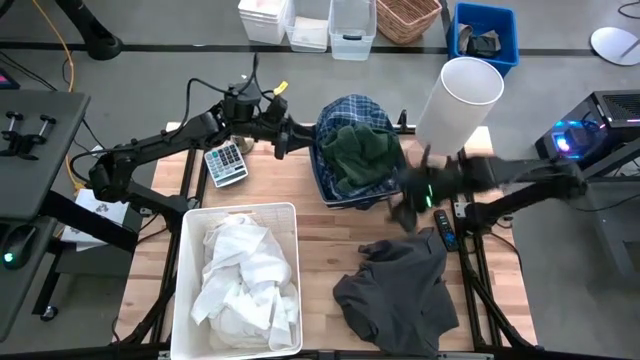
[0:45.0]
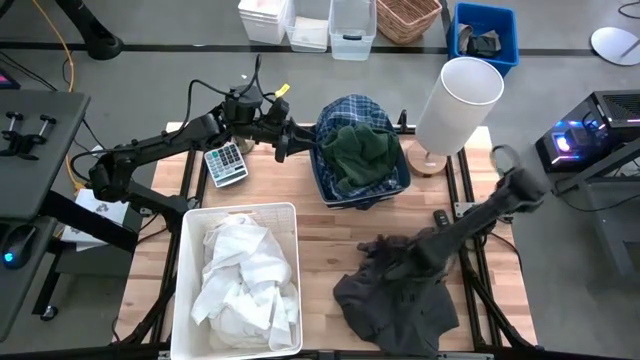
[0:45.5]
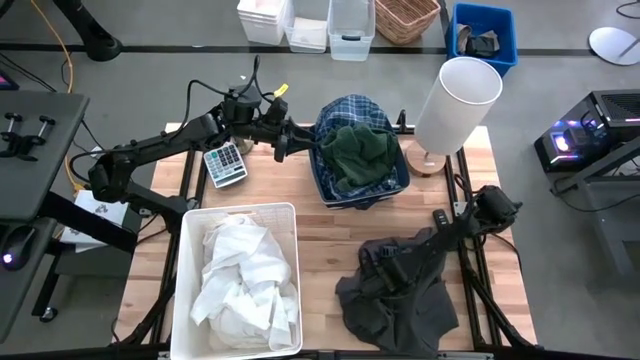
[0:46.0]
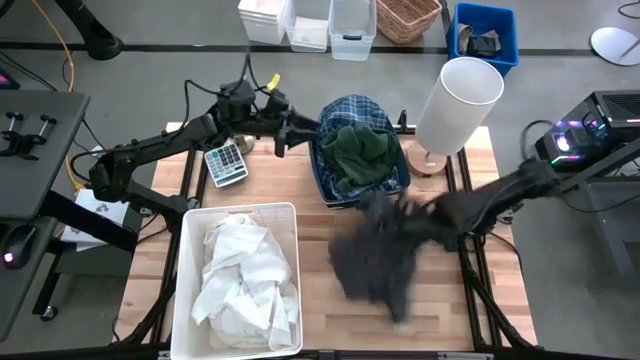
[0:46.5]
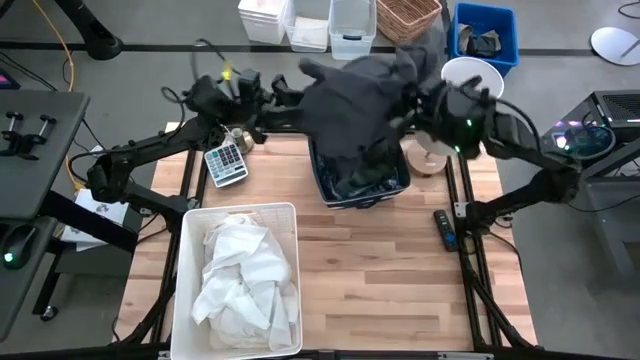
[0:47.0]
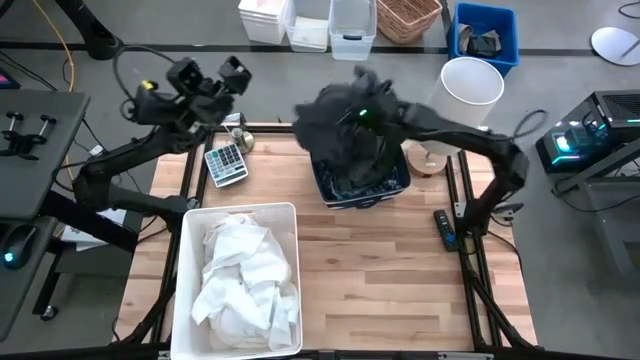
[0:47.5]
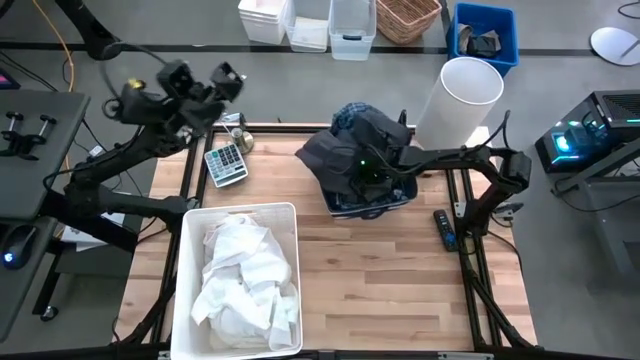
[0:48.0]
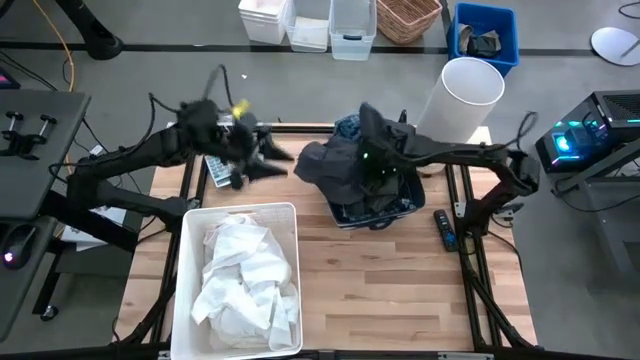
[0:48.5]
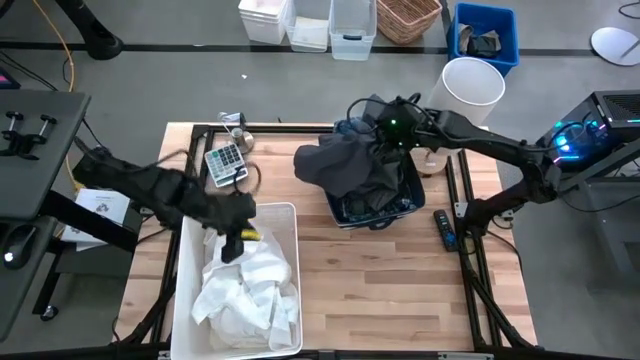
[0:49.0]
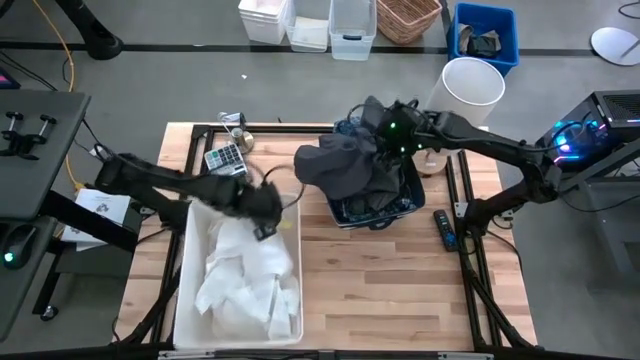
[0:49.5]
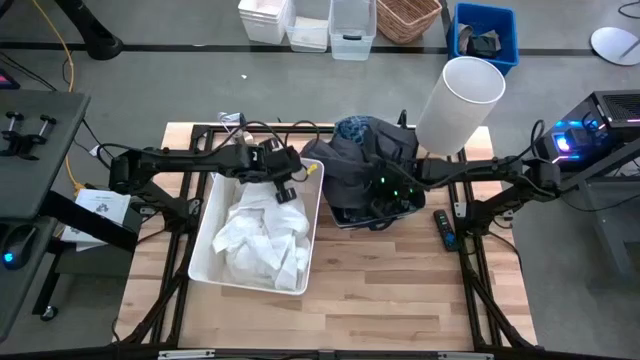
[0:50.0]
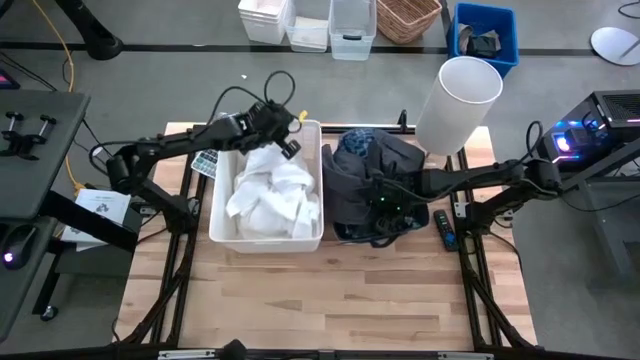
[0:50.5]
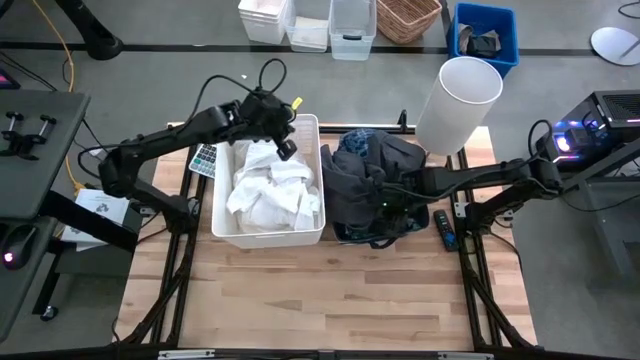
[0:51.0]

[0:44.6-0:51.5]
Task: Sort clothes
Put the black pants into the blue bin

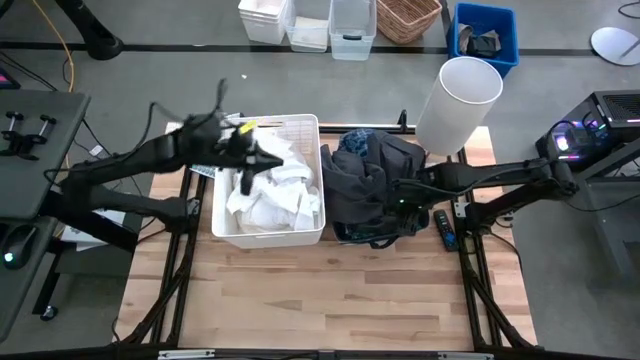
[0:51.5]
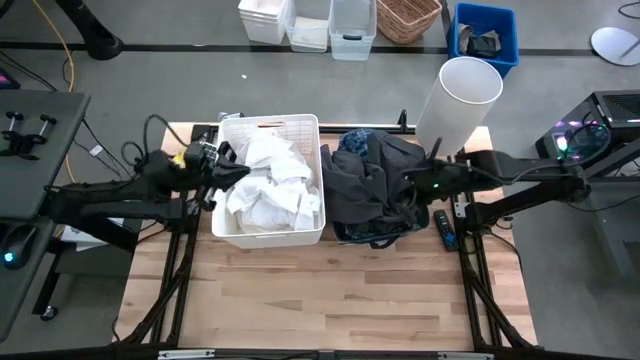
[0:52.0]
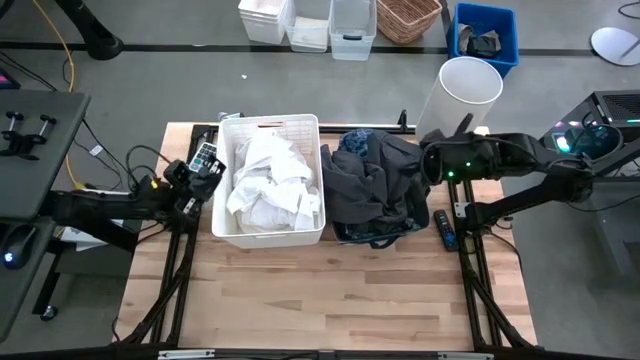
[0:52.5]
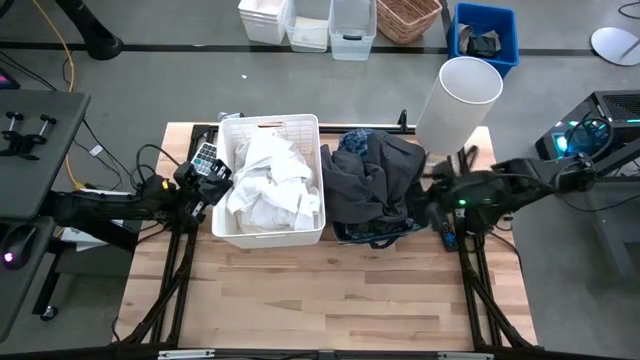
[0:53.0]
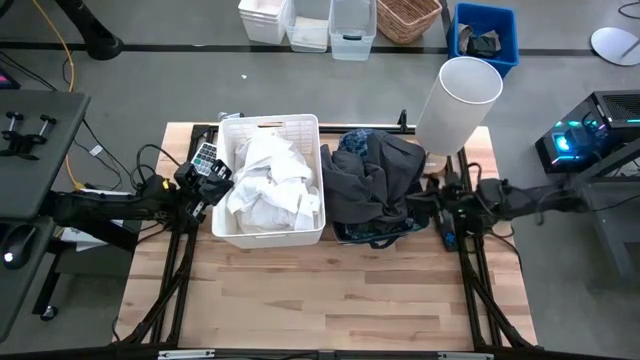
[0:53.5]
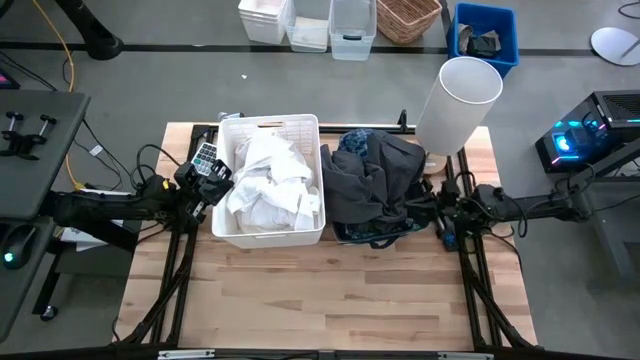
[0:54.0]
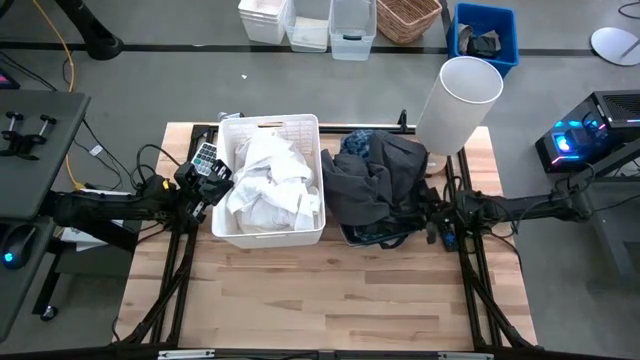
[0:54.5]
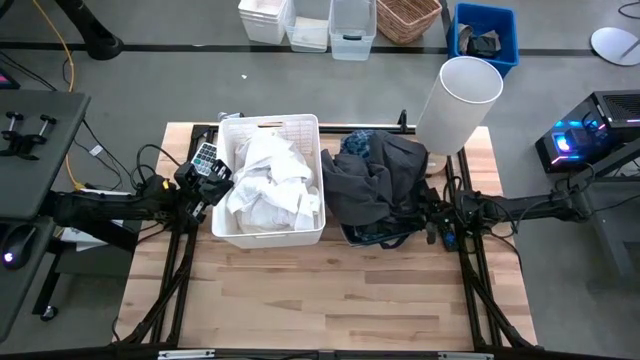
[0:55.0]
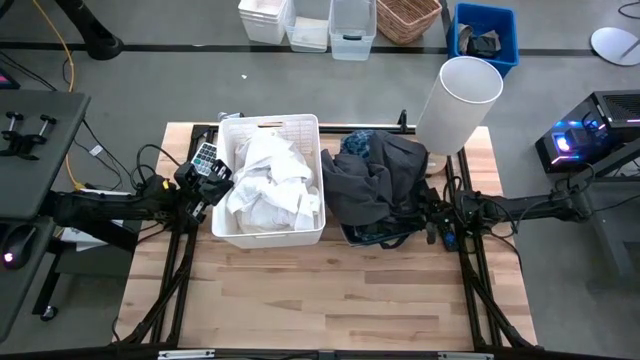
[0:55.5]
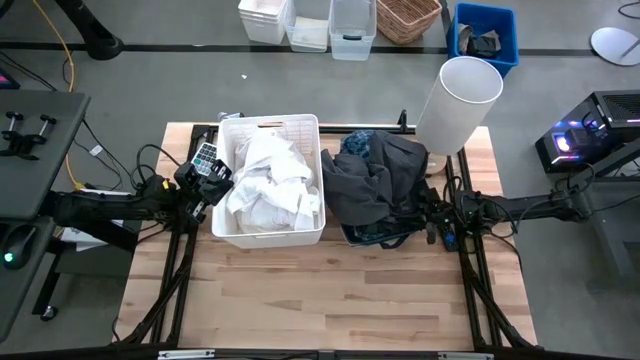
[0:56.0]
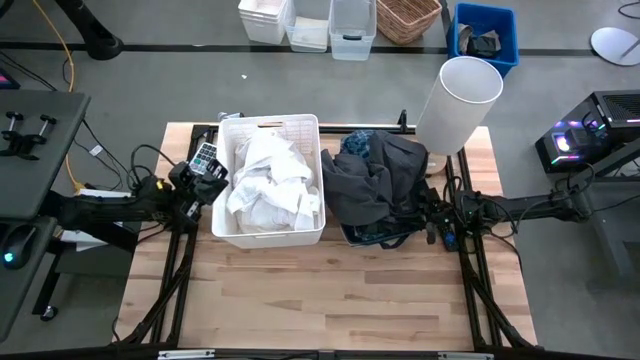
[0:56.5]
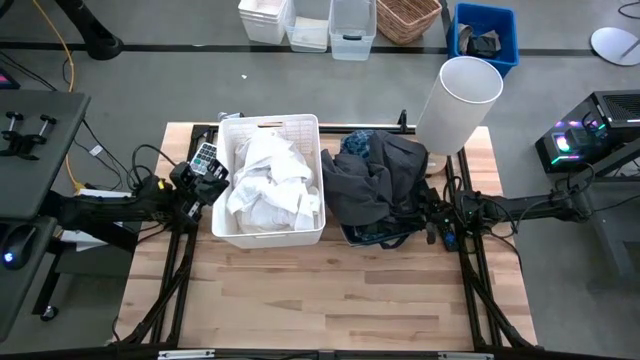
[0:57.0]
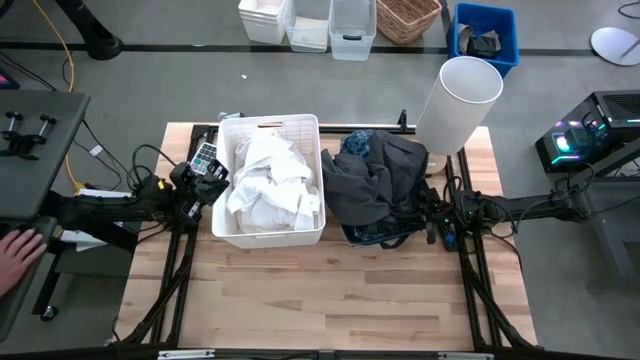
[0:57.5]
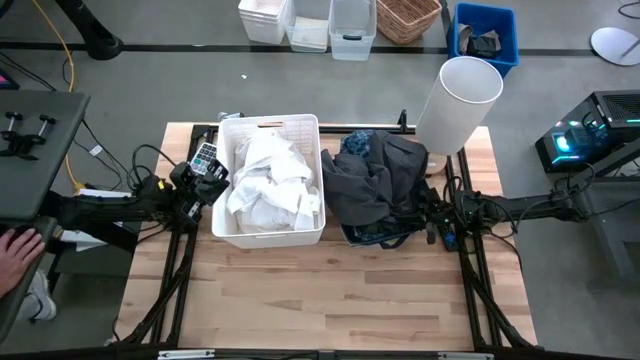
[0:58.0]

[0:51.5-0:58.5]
Return to home position

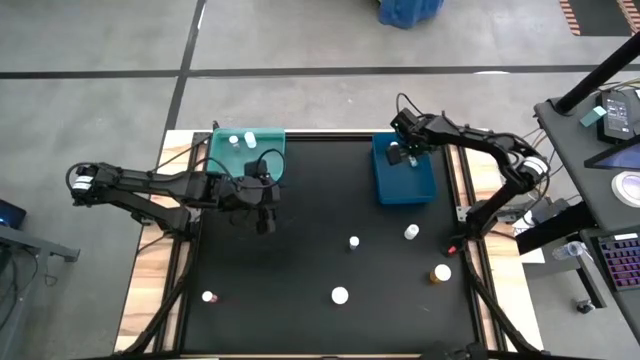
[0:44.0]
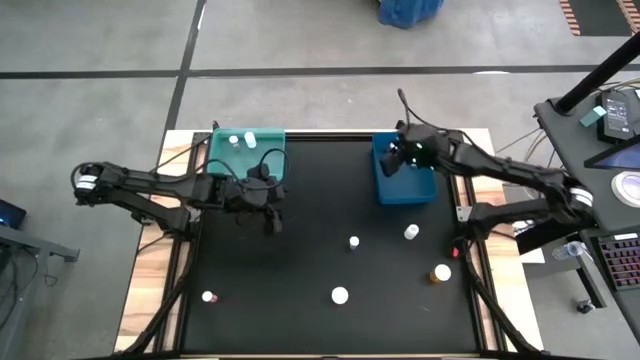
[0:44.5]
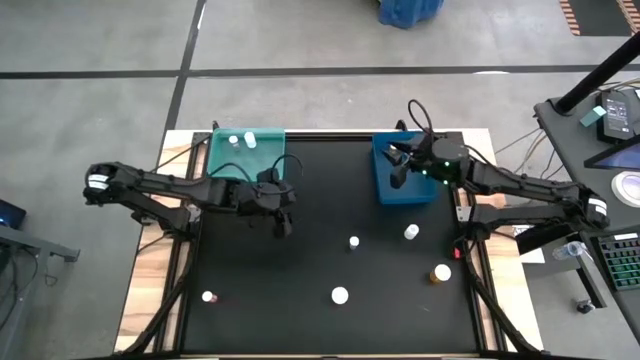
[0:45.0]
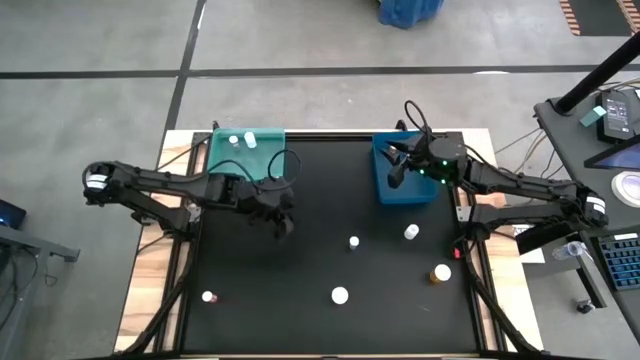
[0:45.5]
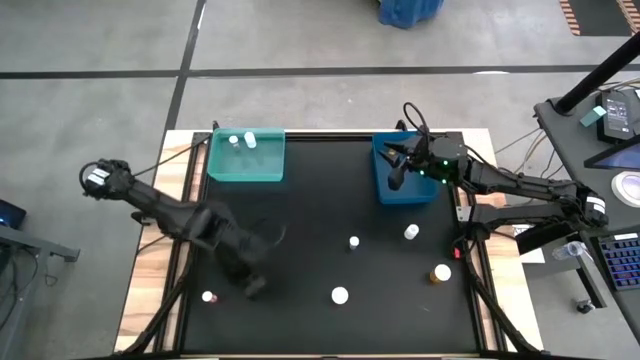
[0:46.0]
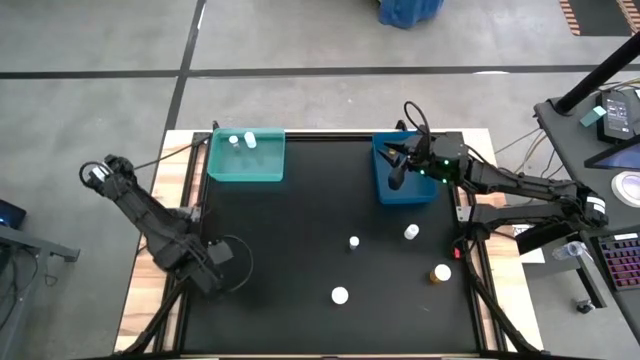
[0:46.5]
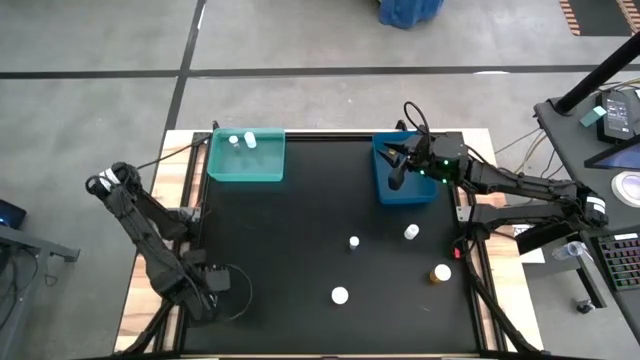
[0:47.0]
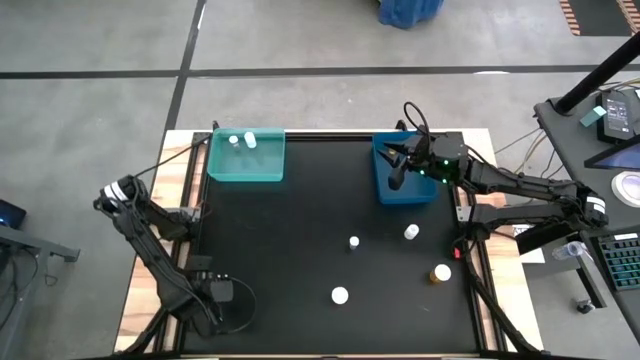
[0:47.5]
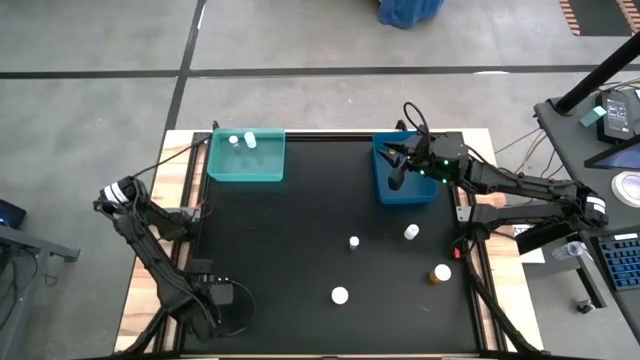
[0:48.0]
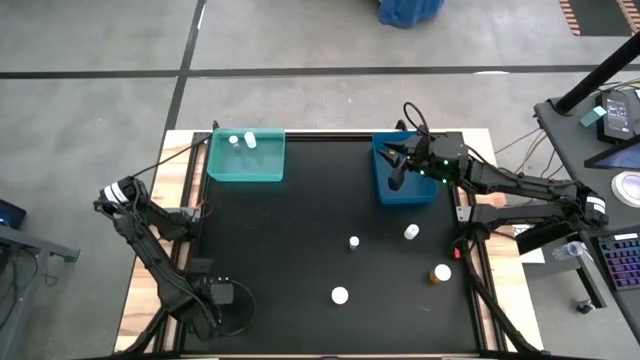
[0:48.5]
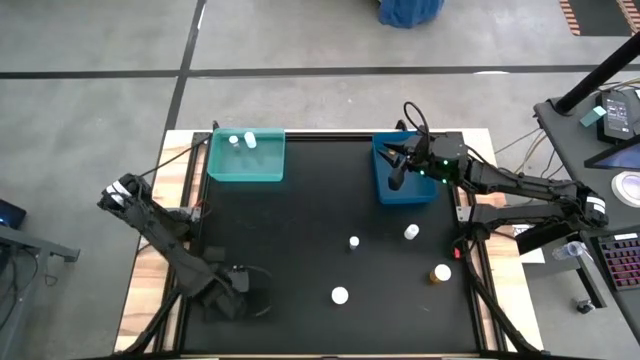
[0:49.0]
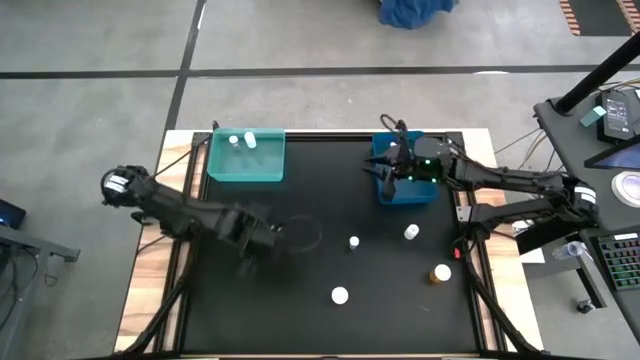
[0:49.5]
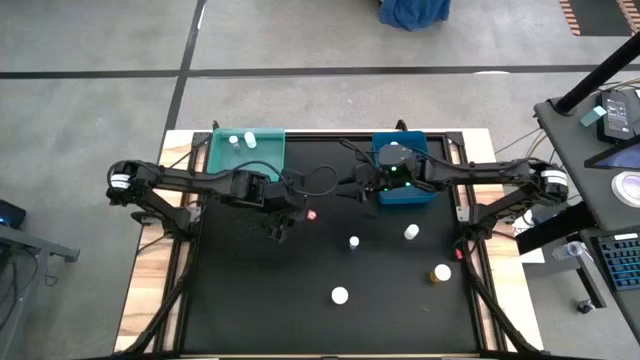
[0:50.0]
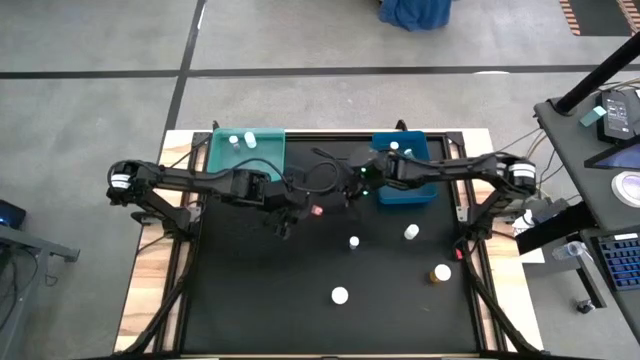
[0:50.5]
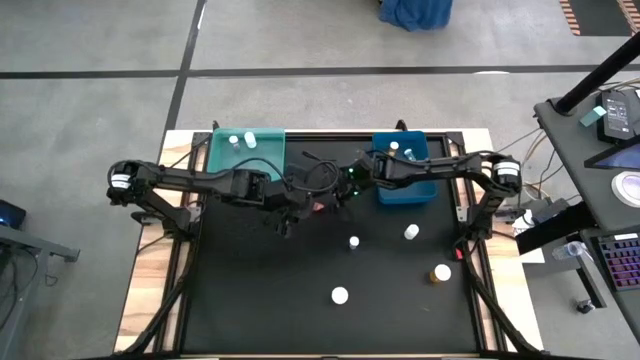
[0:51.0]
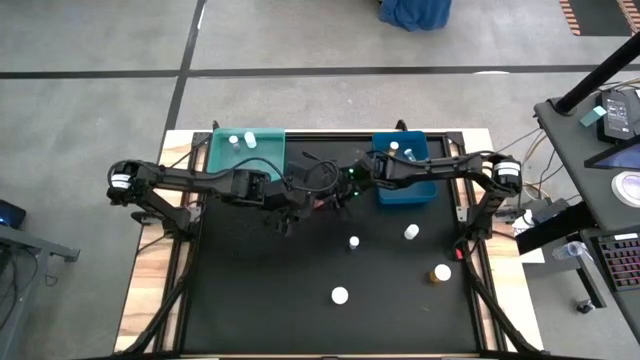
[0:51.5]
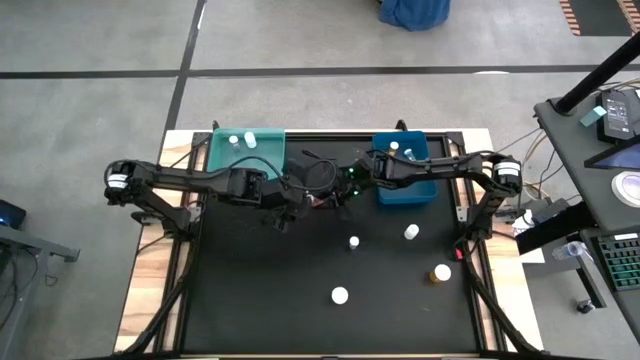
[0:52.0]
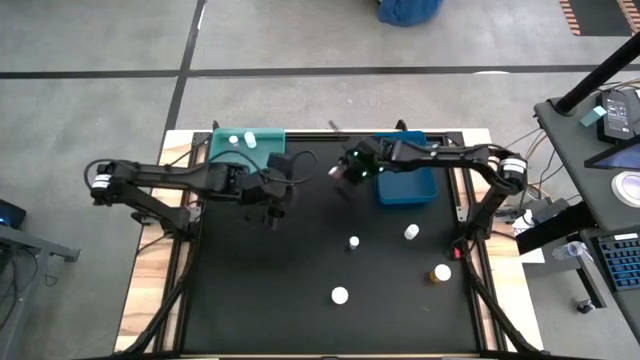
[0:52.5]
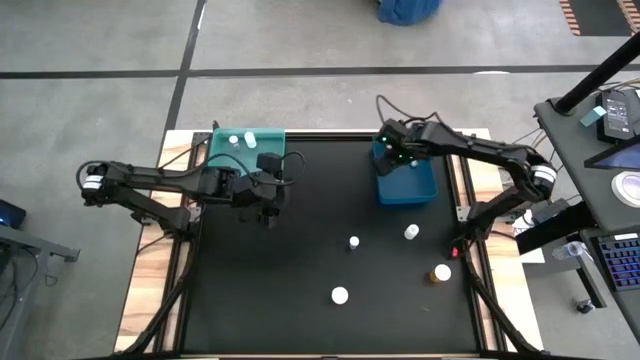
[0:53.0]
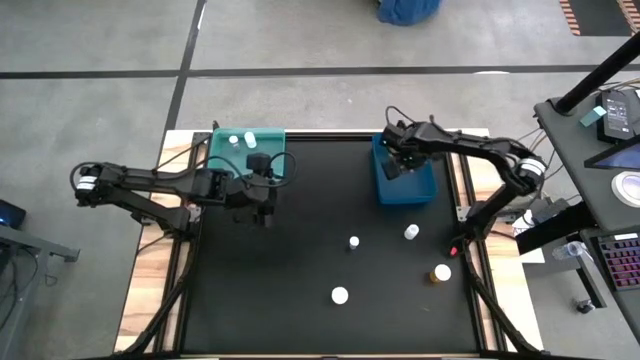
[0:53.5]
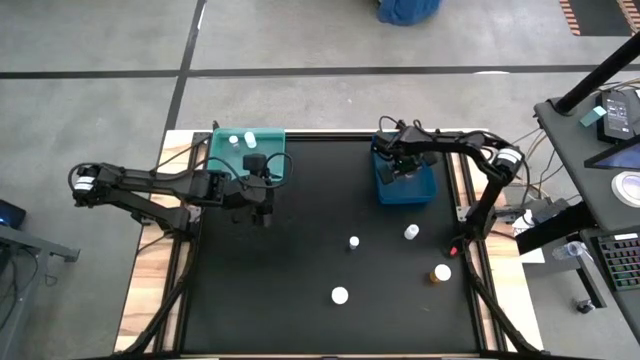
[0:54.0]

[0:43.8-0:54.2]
Task: Pick and place medicine bottles into bin by pill shape (circle, oval)
Put the light orange tablet bottle into the blue bin
